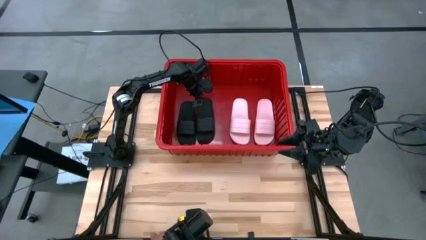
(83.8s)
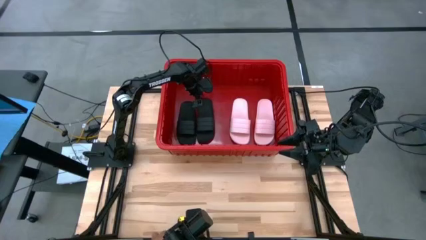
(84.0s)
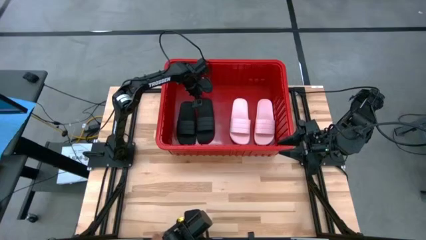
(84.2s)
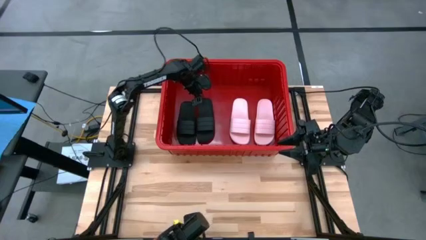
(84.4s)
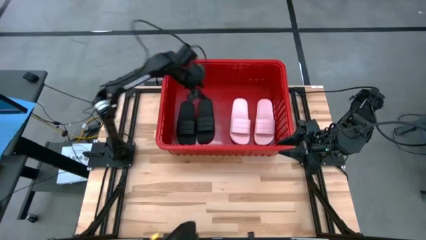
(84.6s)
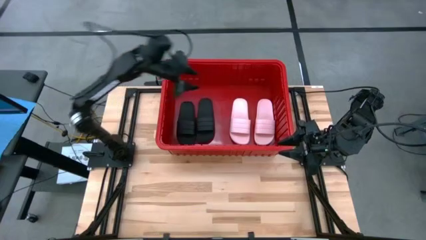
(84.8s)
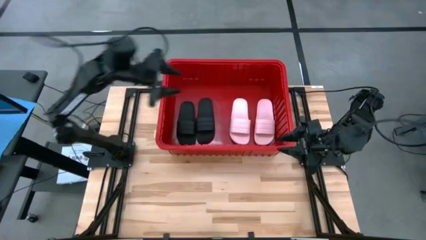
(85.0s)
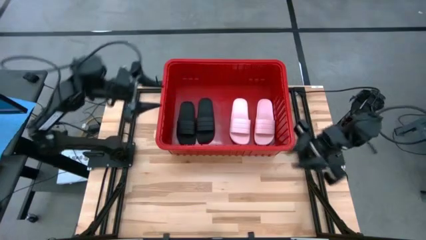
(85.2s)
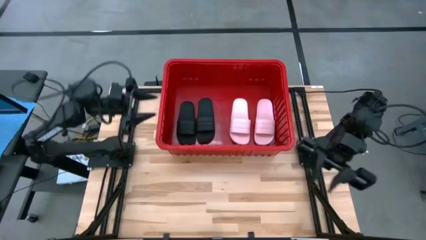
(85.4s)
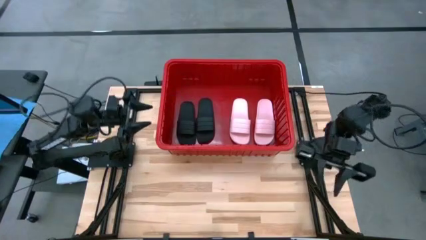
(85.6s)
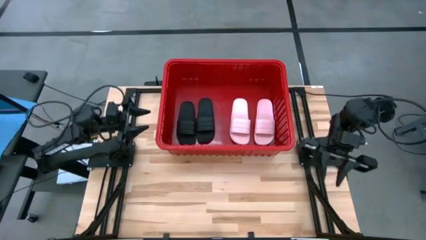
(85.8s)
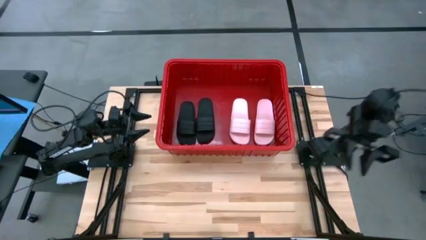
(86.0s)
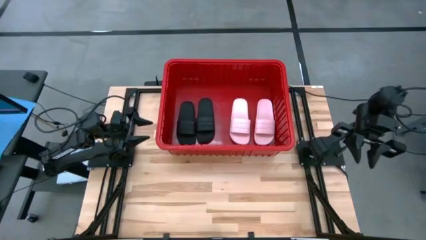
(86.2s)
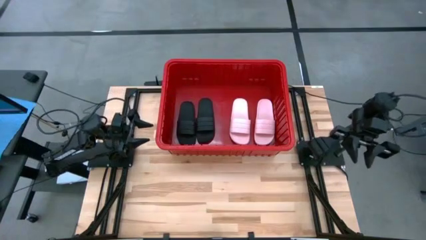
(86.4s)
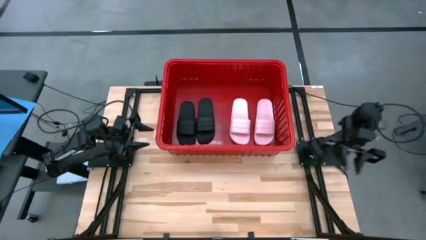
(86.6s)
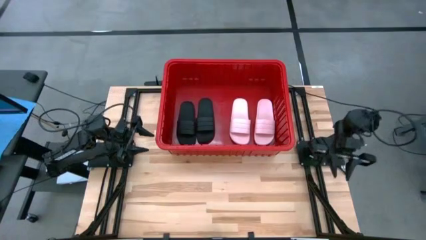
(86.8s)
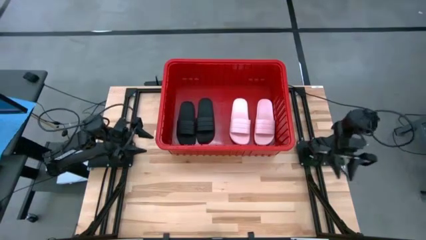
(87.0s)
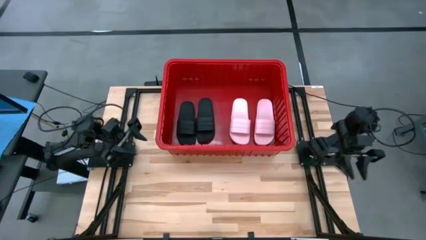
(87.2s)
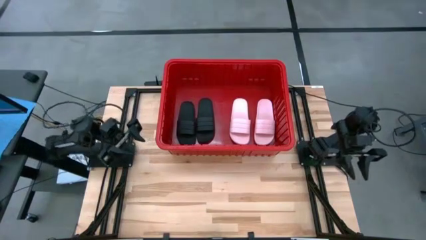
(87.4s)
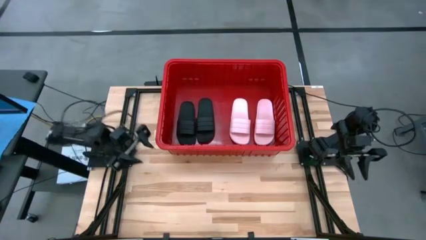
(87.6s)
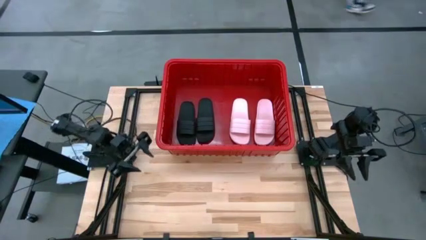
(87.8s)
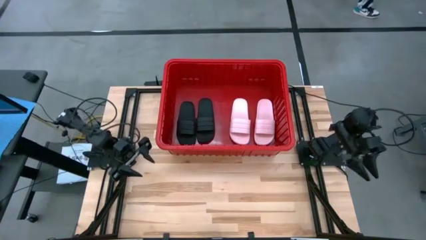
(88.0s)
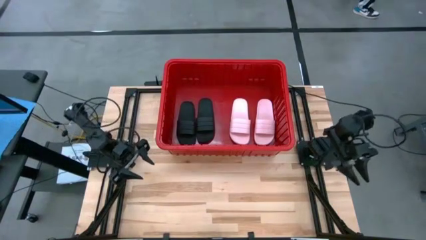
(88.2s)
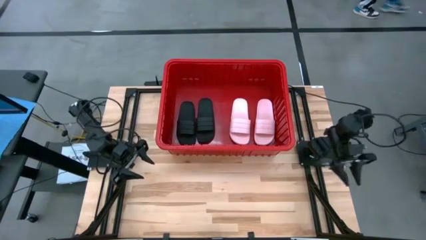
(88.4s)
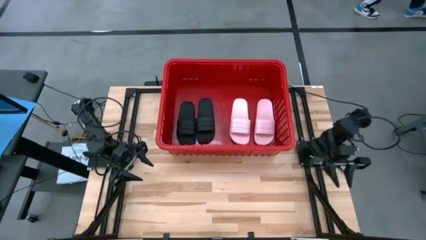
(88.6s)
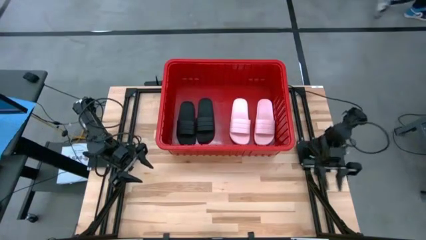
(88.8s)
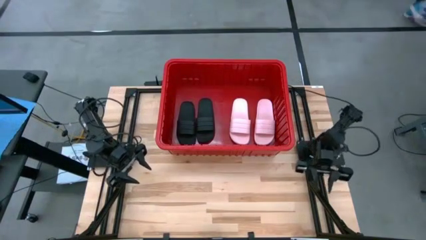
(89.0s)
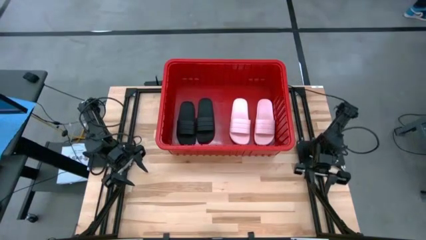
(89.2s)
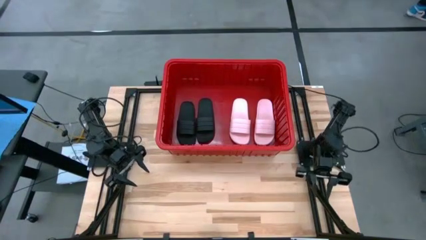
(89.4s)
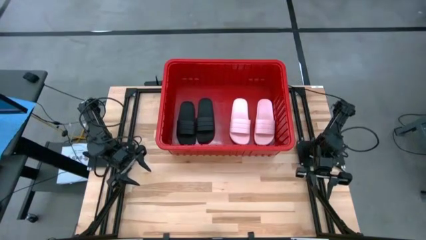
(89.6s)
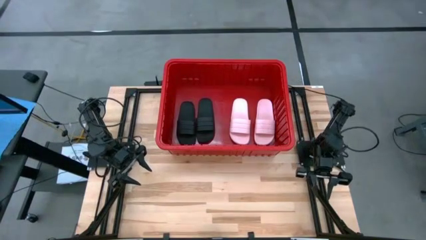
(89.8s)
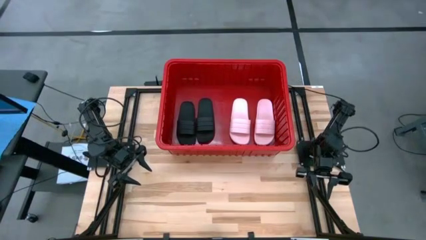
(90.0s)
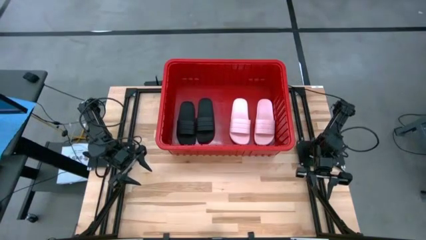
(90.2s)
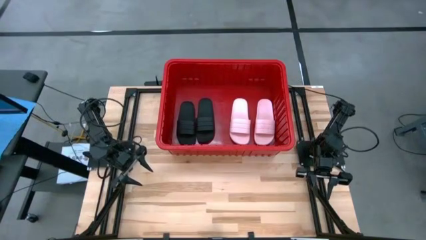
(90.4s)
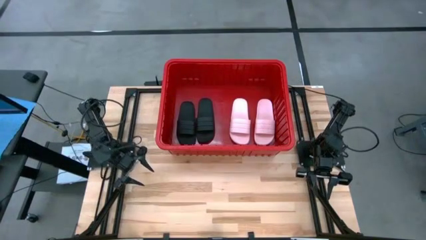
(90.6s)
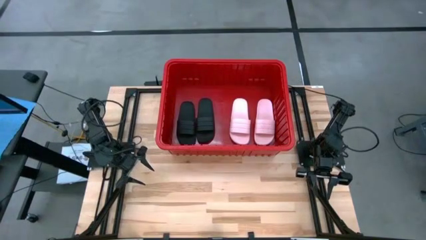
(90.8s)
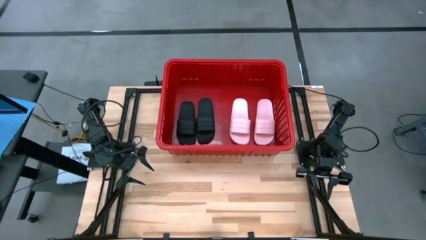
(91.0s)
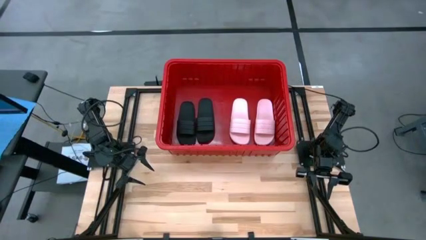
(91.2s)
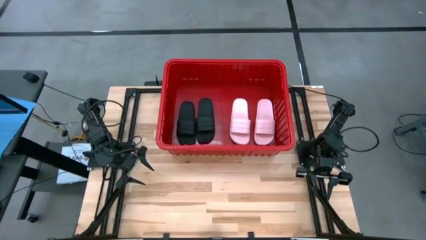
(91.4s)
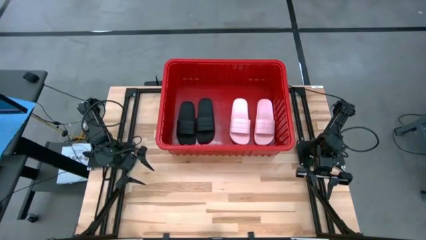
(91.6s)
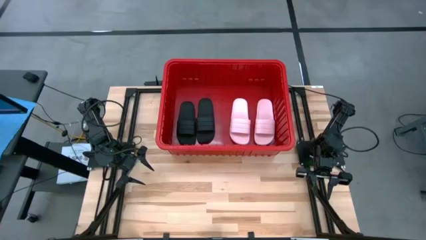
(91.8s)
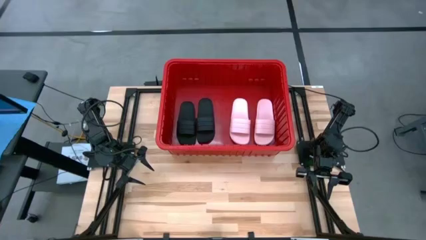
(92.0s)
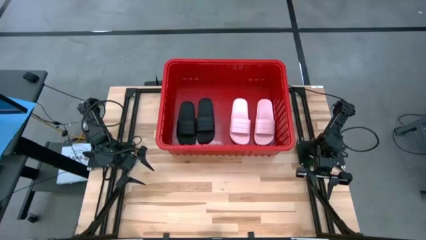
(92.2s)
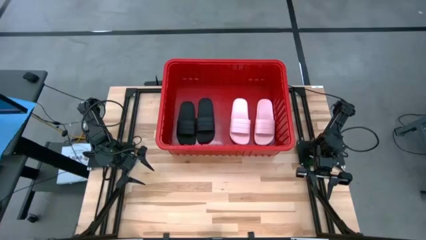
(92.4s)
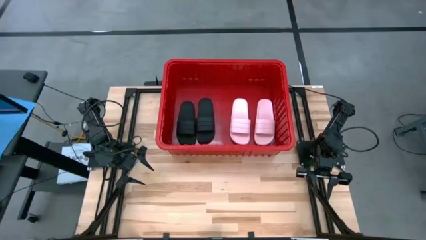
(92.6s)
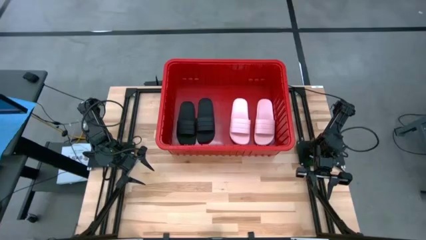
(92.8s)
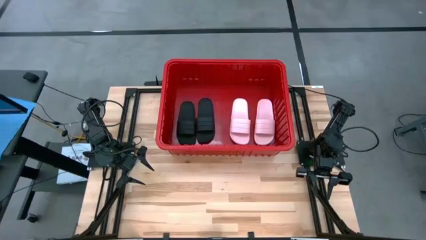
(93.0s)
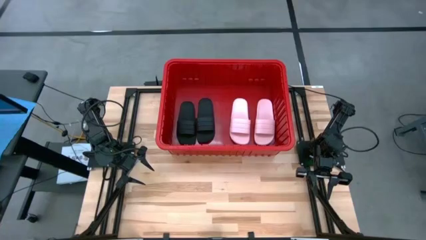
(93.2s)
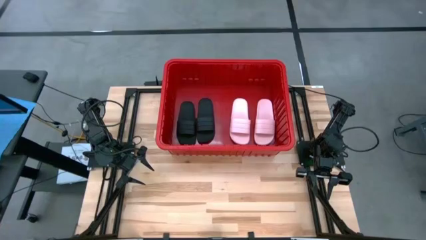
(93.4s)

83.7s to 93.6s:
Task: Pick and place slides into bin
Return to Home Position

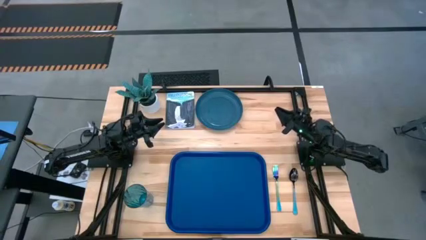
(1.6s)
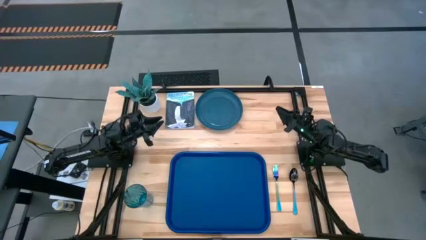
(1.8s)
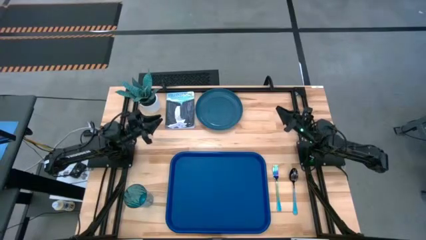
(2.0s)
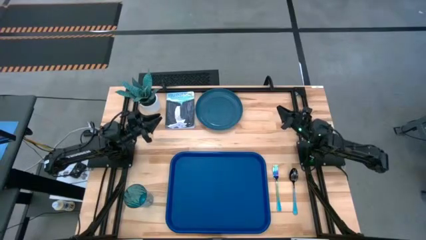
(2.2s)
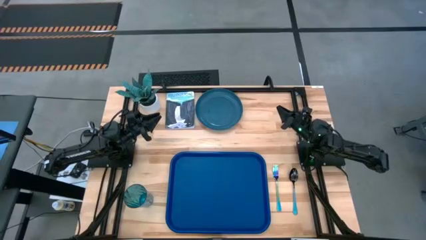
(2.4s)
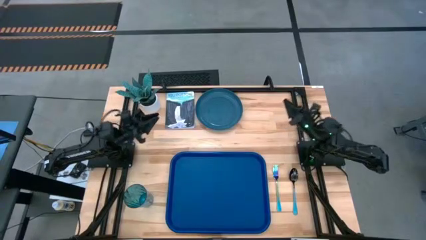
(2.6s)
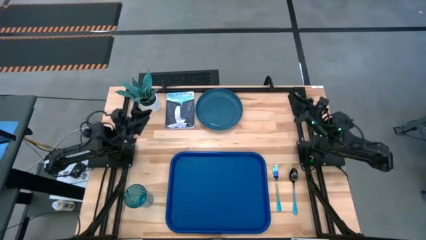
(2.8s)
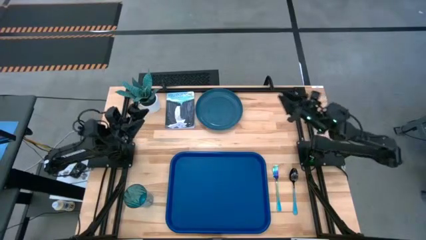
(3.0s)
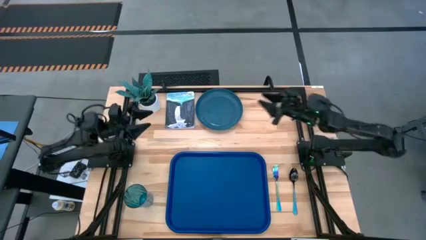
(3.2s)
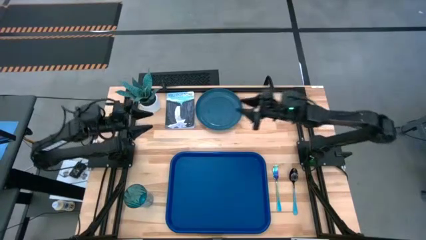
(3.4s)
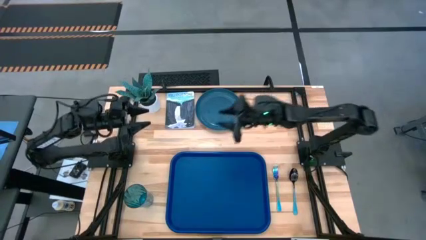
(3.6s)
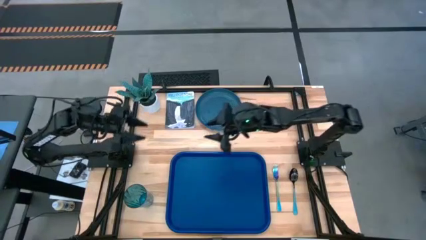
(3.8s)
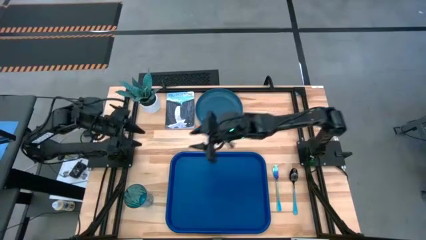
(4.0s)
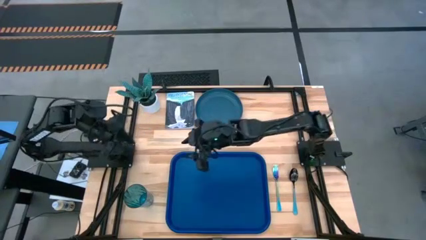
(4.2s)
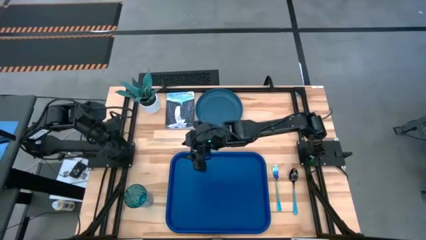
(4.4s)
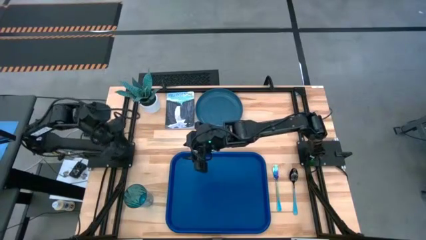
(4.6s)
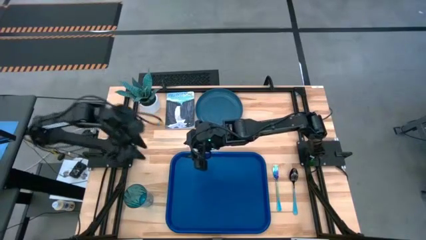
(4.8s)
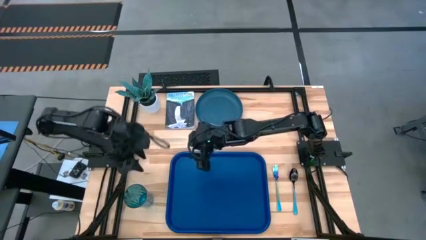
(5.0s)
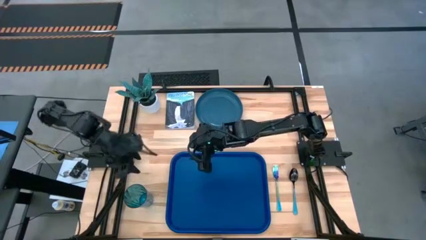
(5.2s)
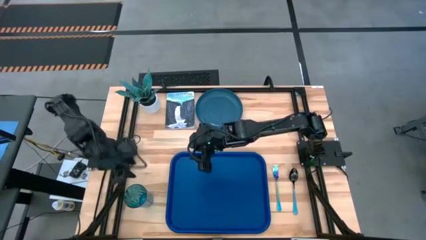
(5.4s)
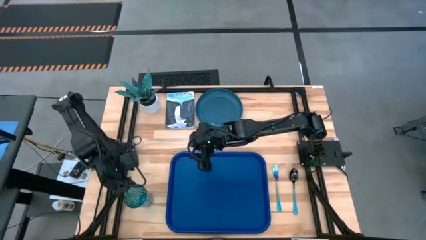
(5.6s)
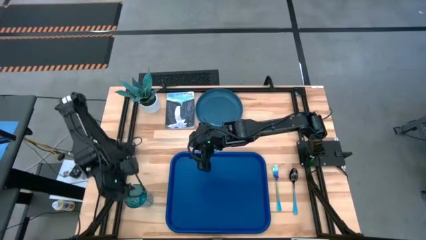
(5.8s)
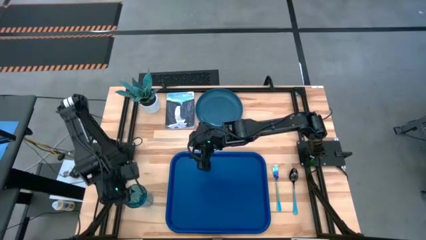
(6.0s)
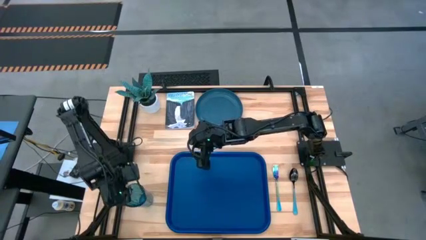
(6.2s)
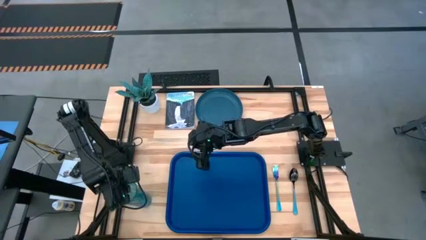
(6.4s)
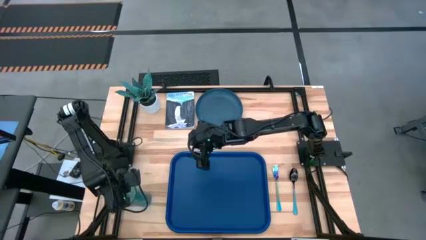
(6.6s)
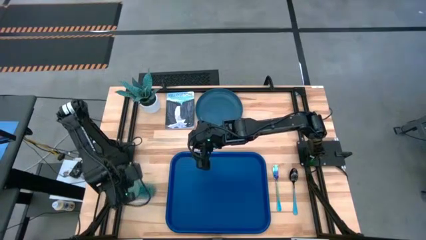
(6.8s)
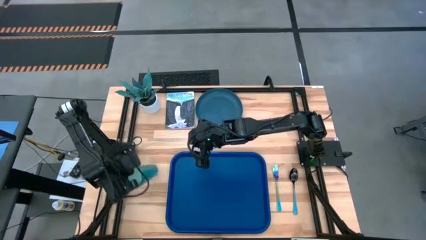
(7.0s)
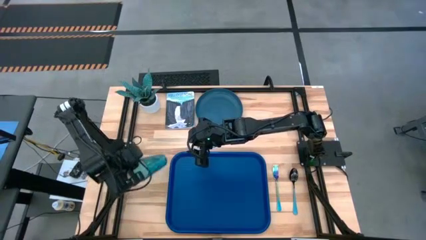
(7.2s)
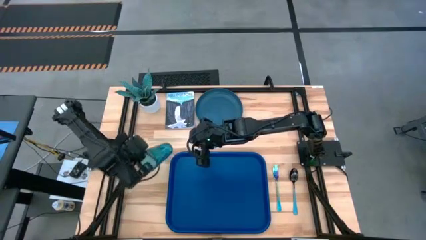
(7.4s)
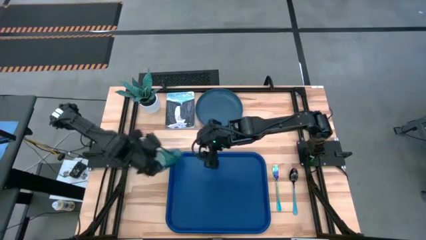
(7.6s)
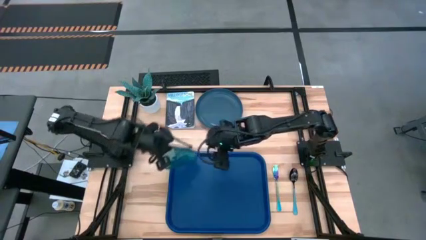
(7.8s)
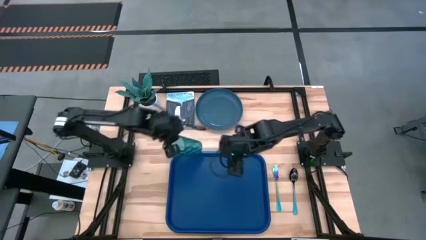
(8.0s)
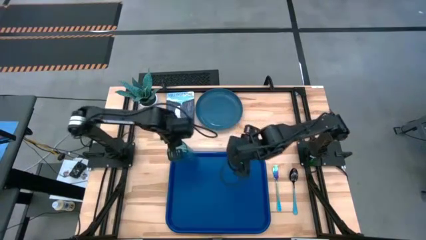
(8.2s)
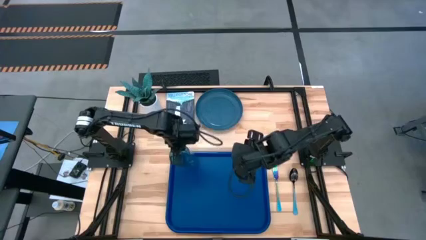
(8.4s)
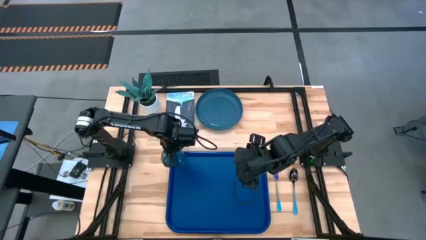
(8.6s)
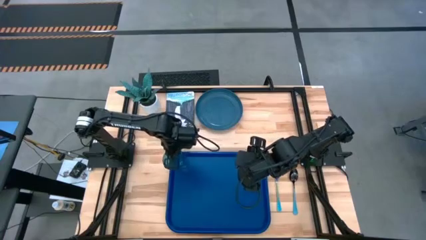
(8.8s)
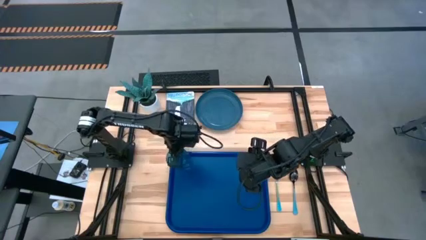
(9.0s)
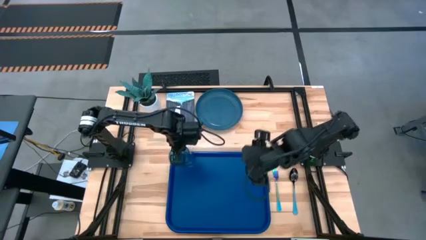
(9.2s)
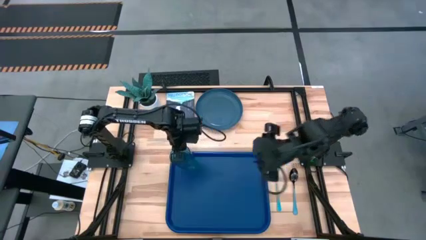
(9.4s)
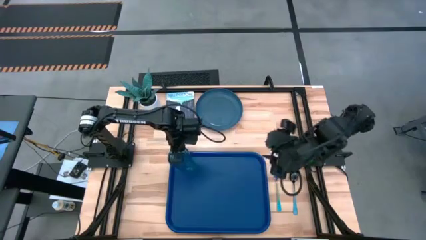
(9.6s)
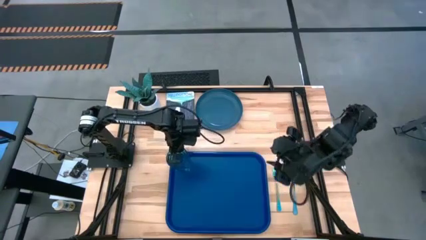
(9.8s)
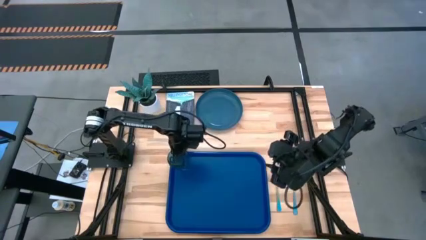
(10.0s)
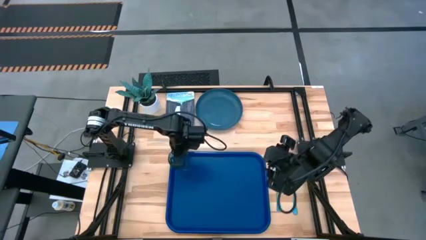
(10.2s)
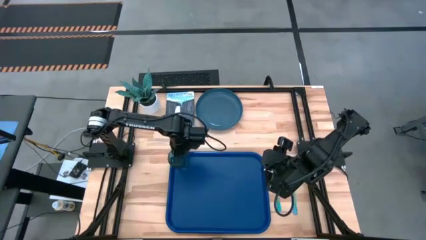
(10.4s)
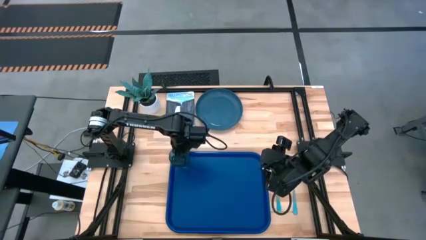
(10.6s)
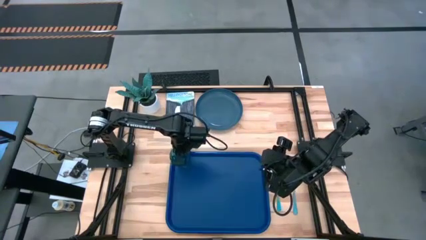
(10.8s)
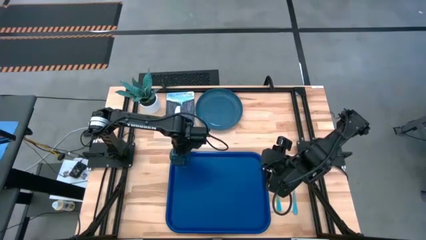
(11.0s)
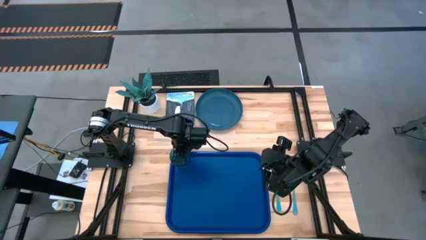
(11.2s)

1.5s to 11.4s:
Task: Pick and place plate/cup/fork/spoon on tray
Put the blue cup on the blue serving tray
